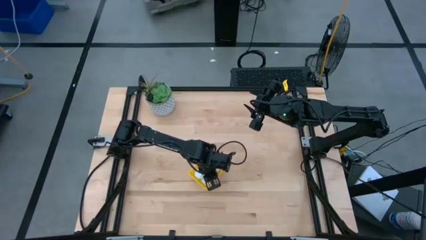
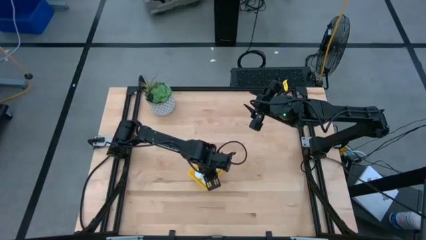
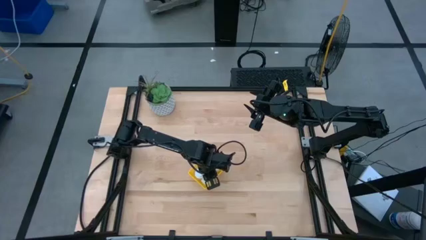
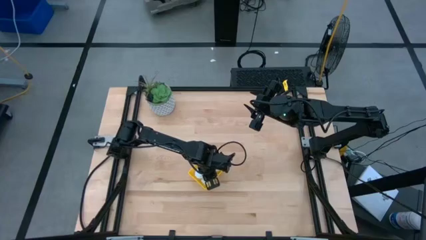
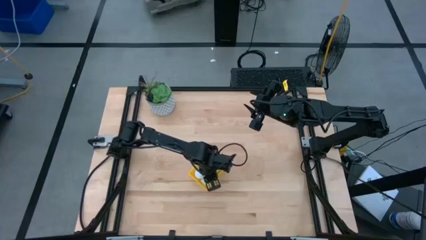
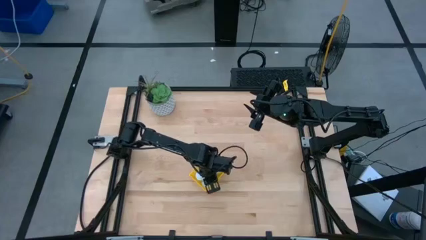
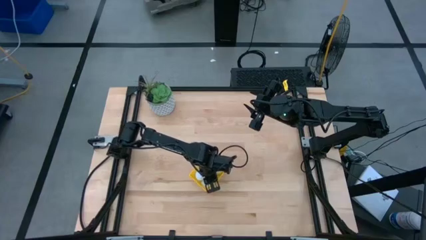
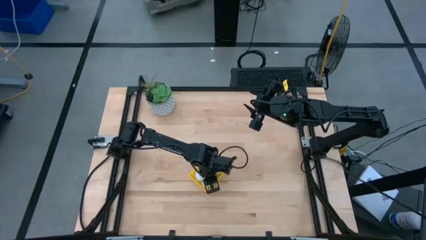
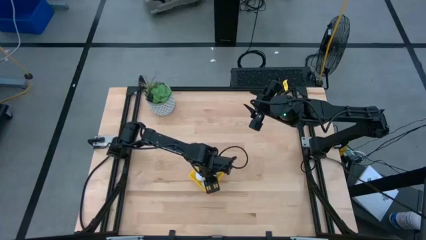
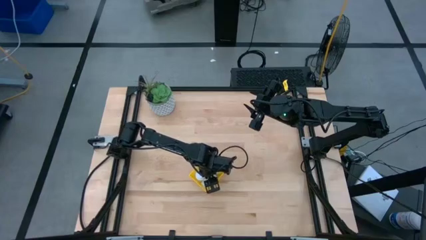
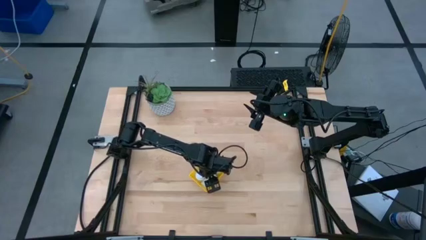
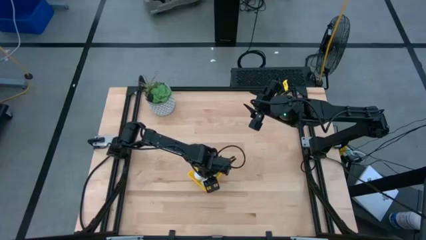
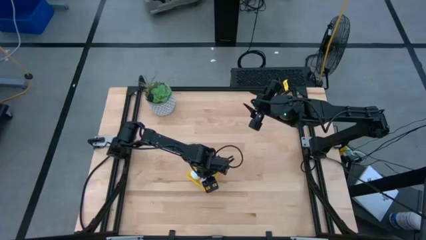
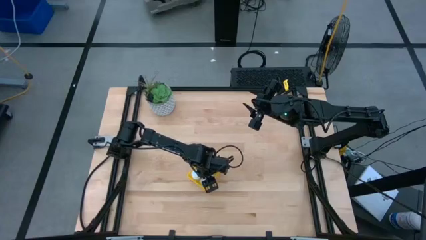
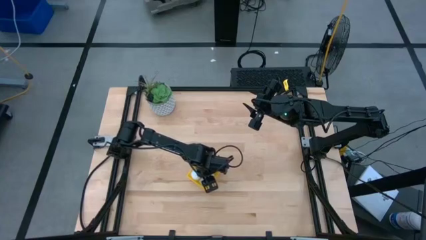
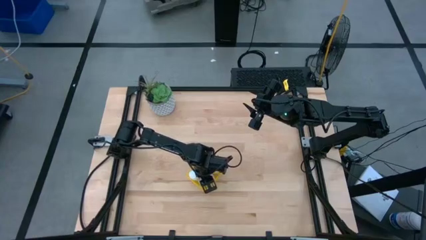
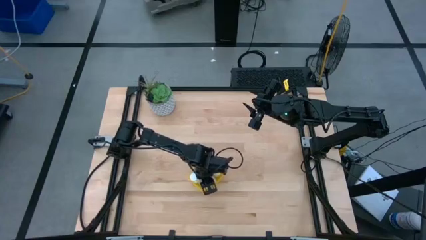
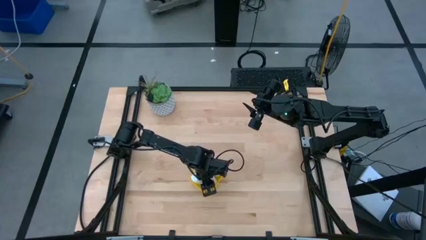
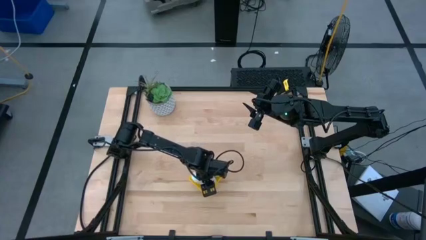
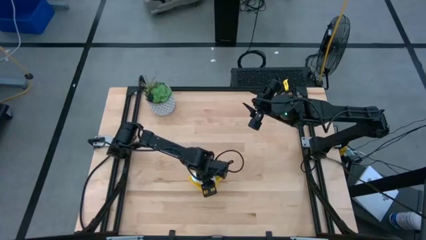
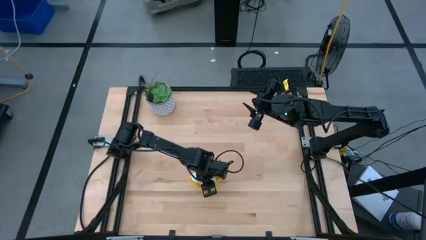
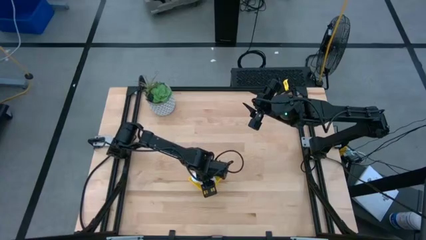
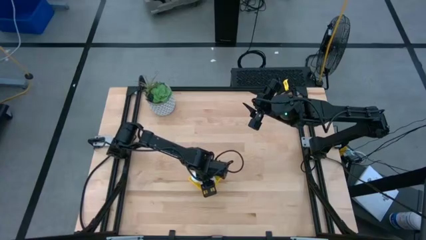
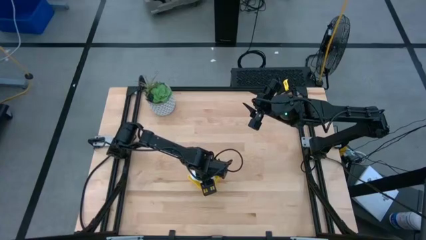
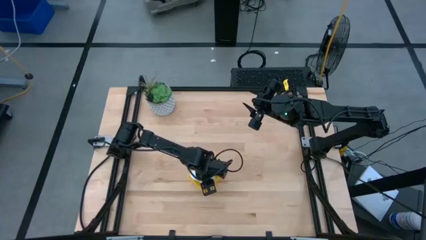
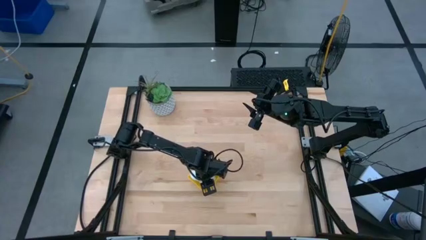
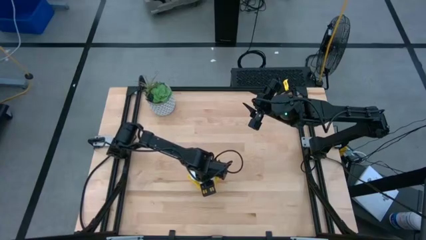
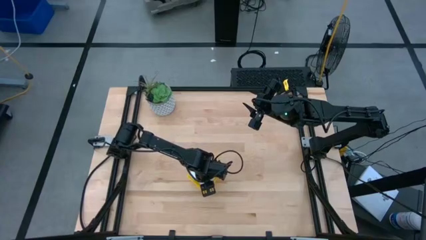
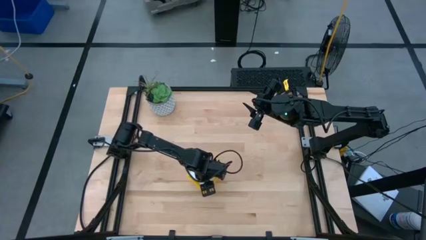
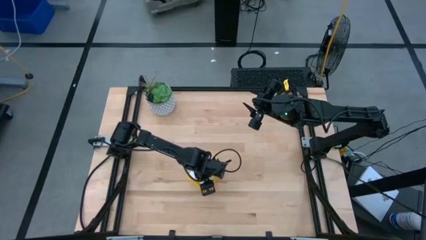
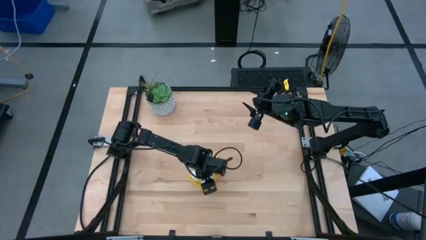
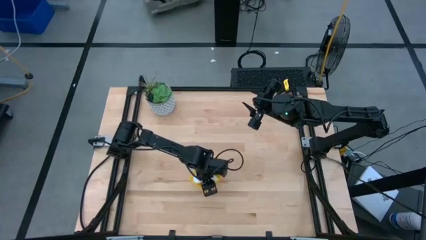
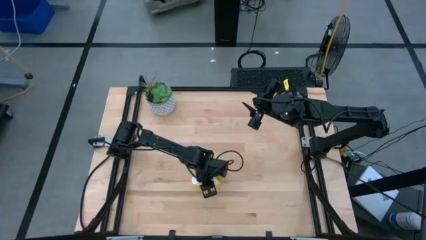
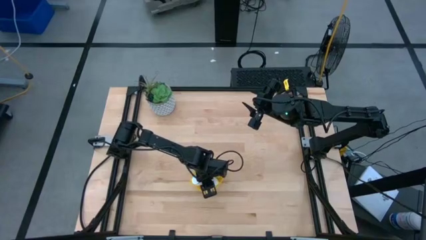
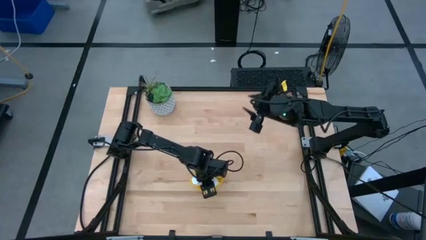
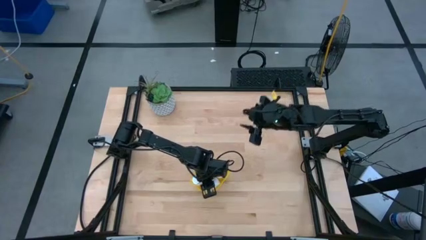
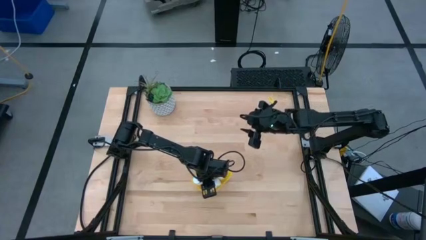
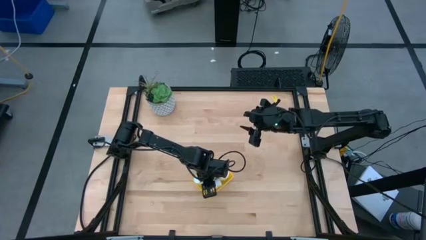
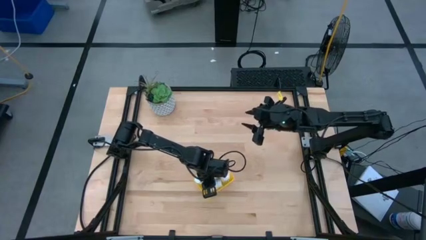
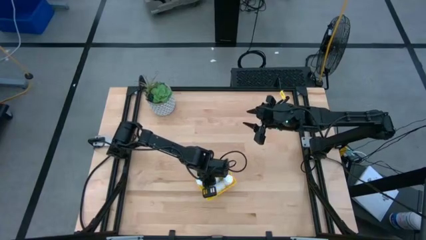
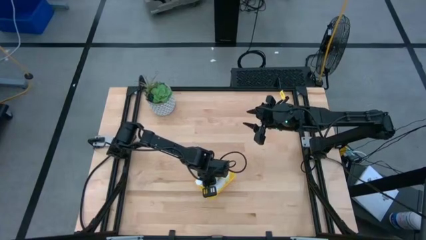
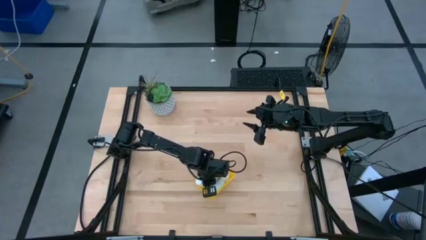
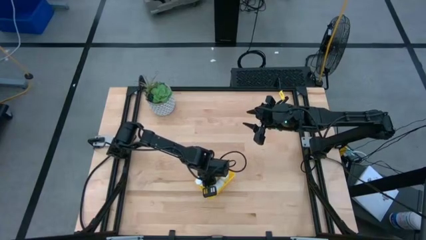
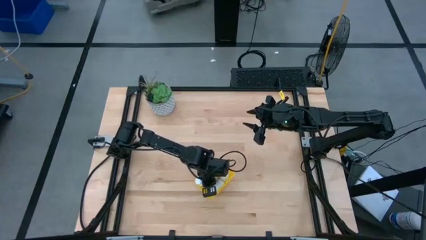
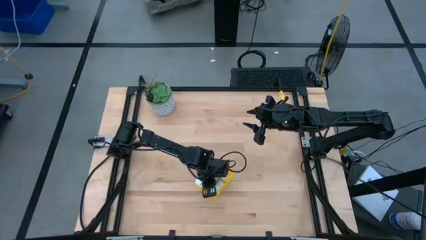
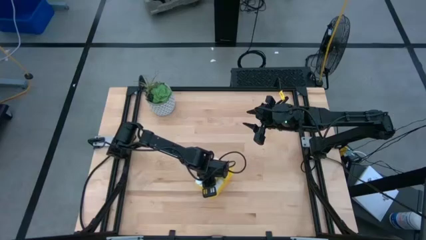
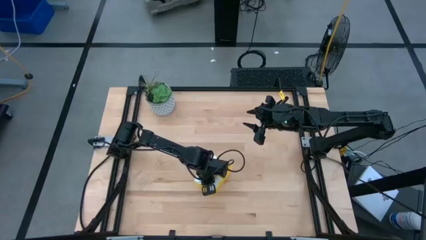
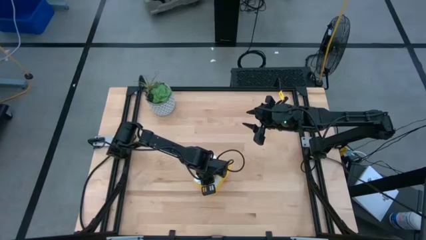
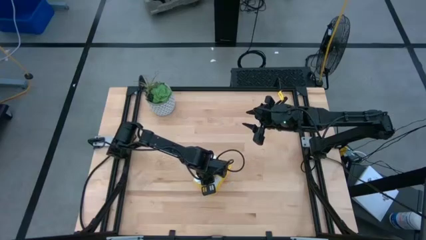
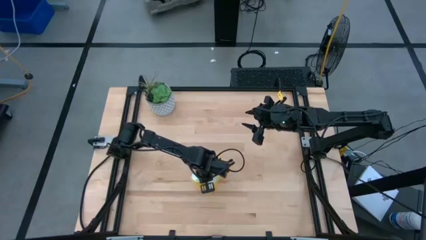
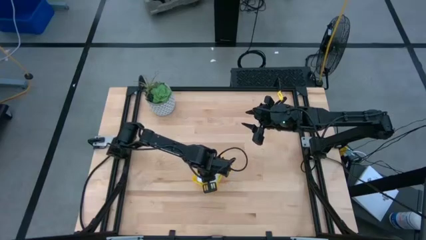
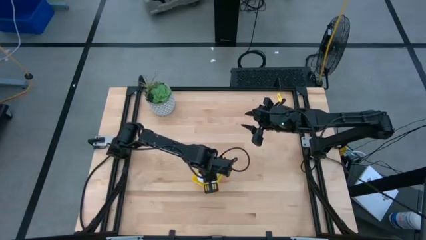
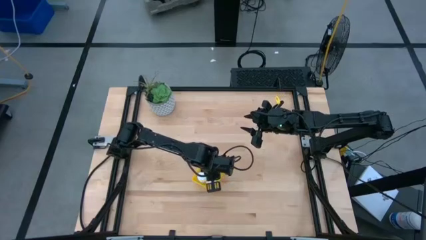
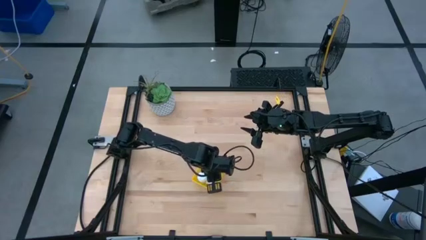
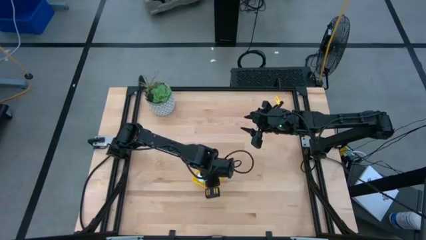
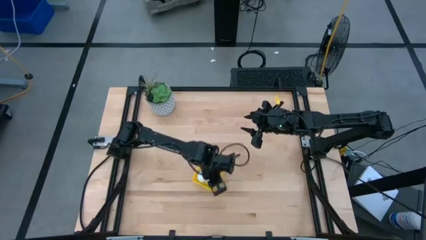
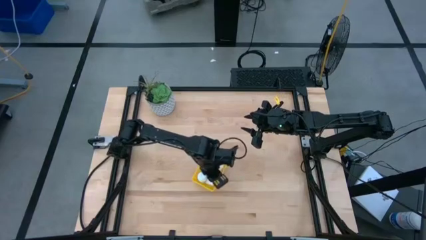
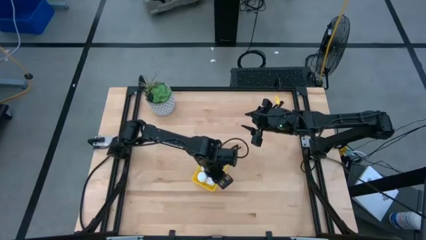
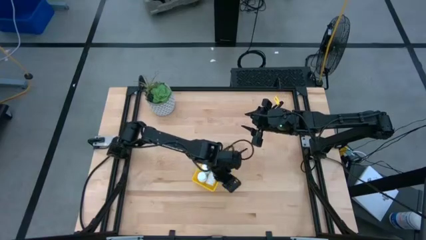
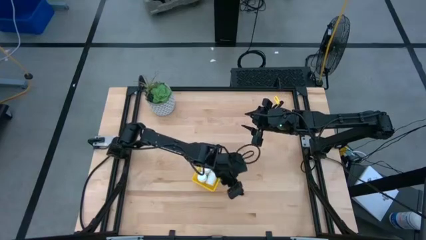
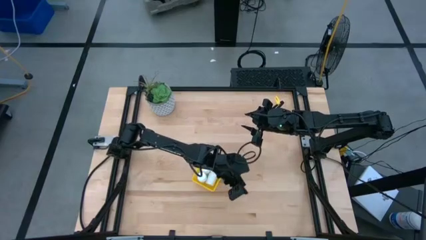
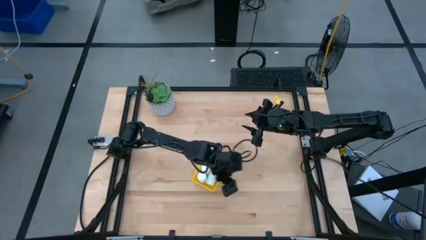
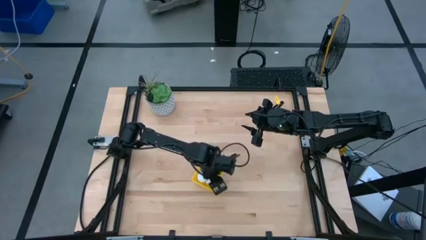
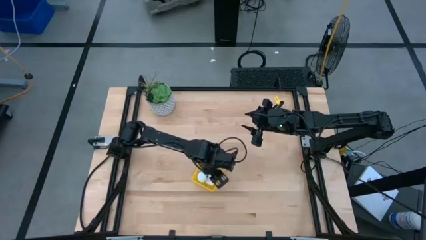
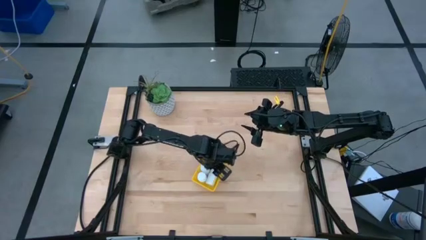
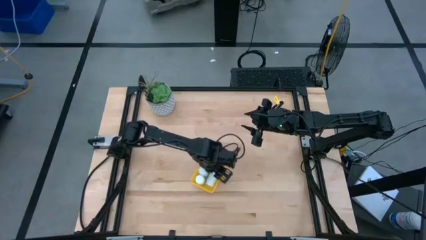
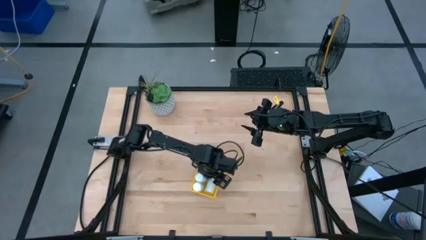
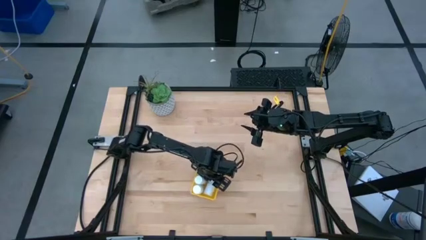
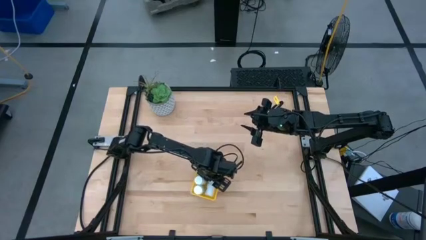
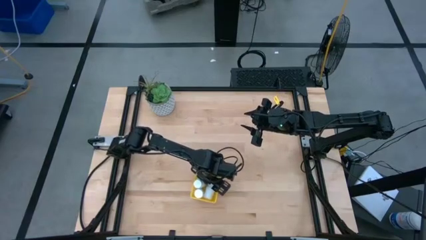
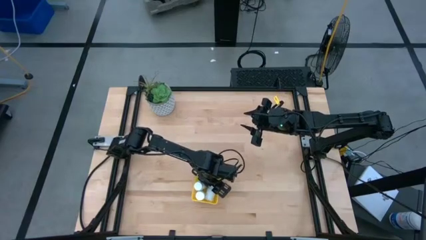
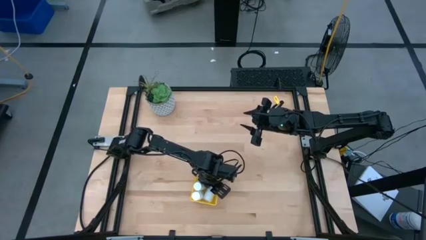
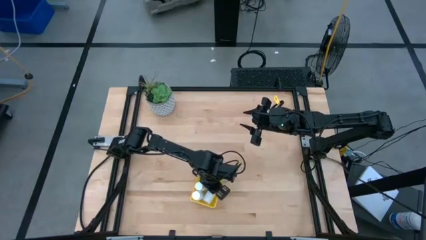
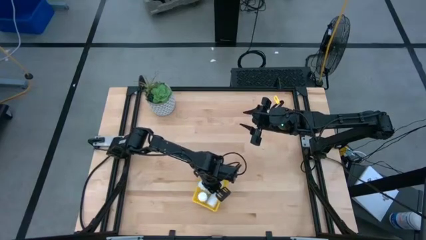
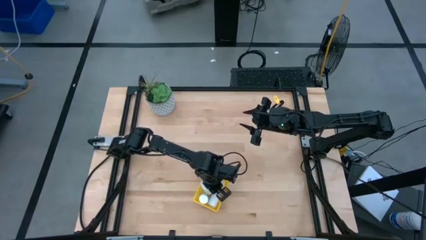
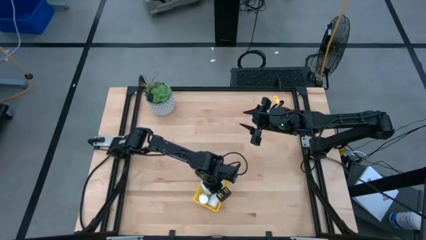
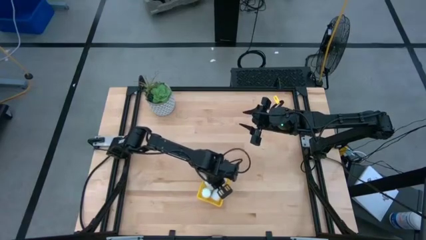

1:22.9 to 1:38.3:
Task: Pick and place pill bottles into a basket
Adjust the white medicine bottle in the yellow bin
